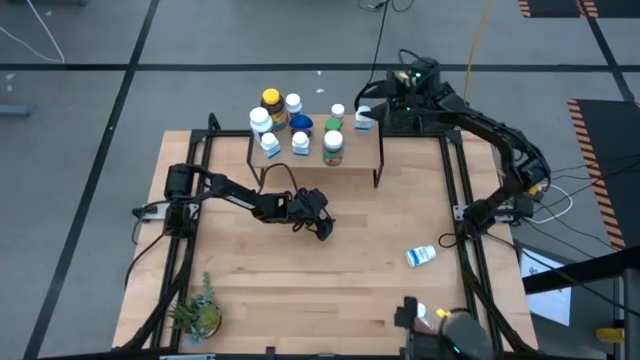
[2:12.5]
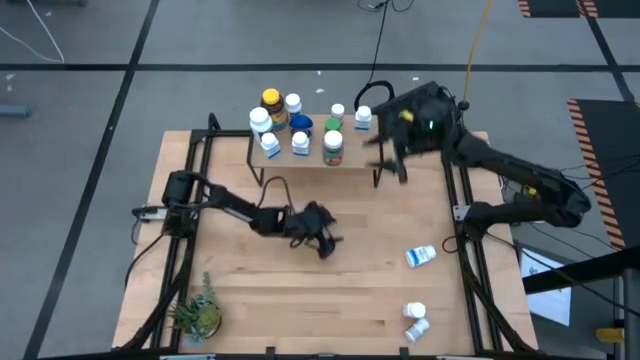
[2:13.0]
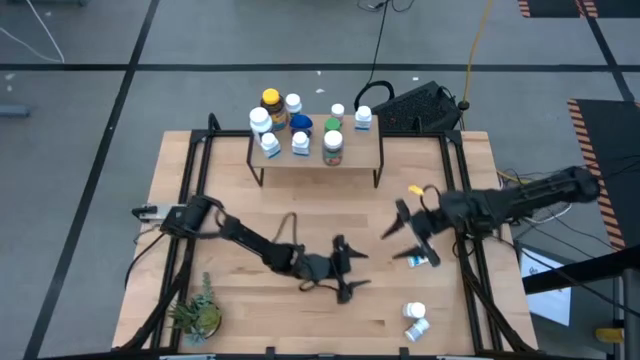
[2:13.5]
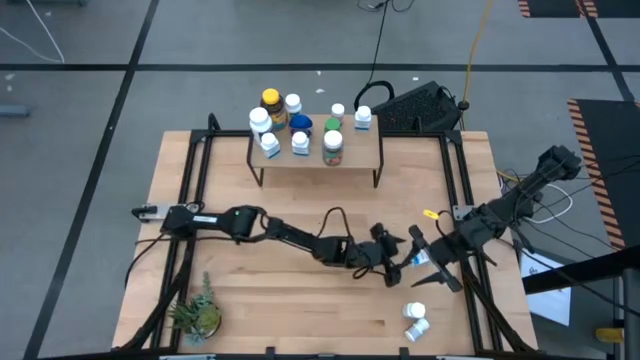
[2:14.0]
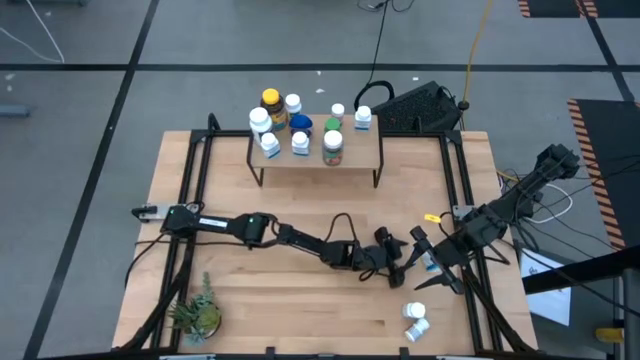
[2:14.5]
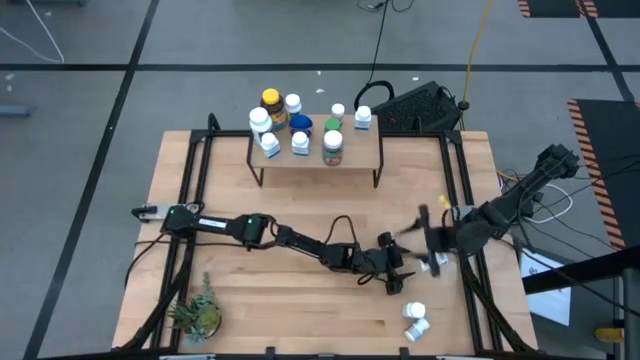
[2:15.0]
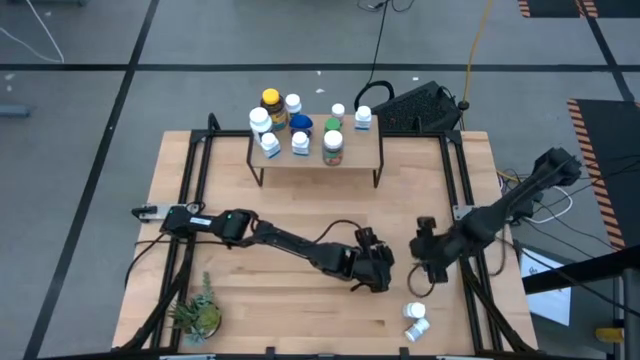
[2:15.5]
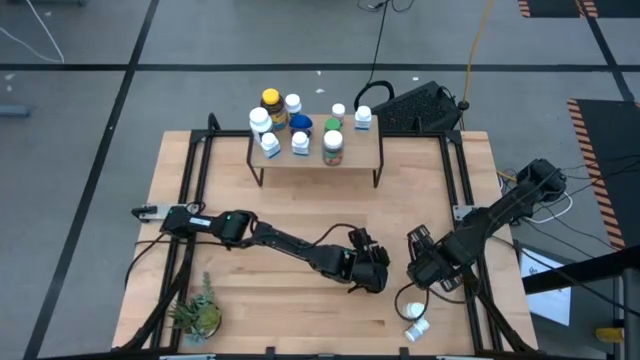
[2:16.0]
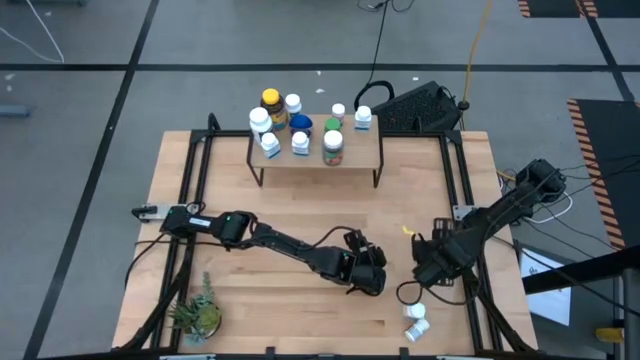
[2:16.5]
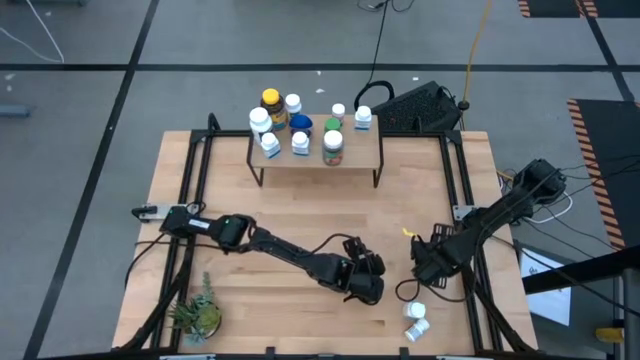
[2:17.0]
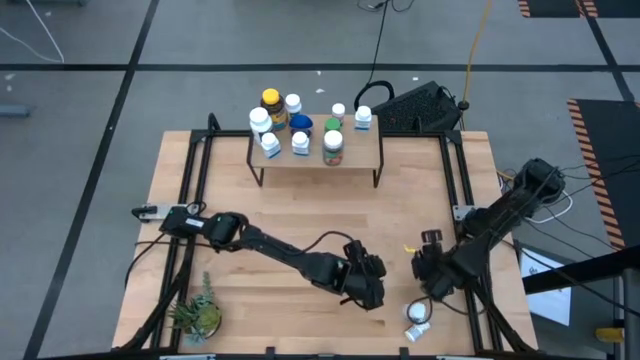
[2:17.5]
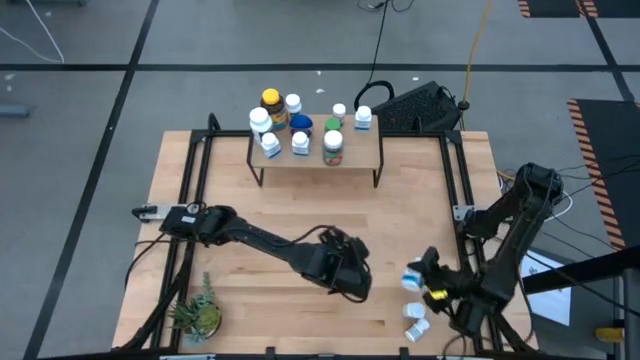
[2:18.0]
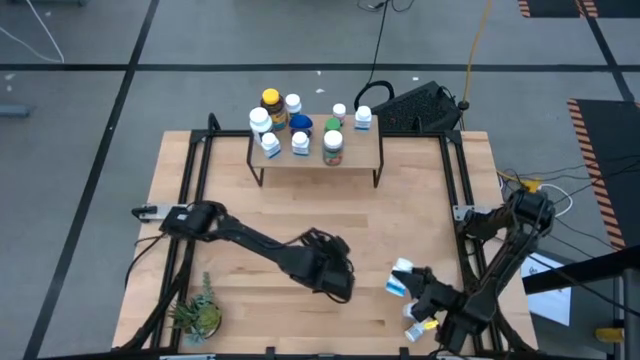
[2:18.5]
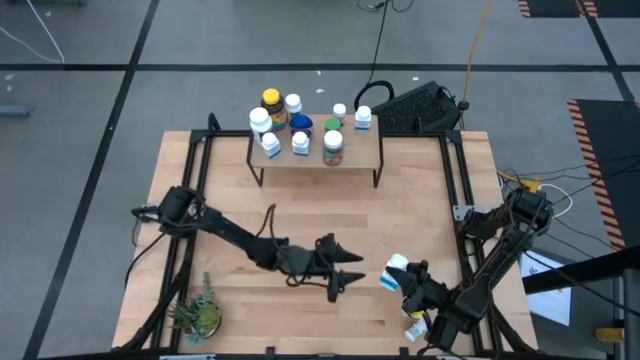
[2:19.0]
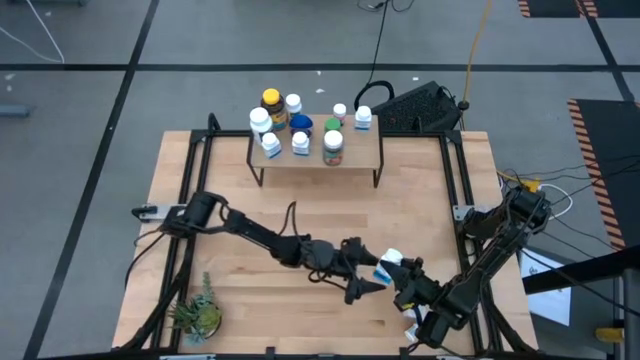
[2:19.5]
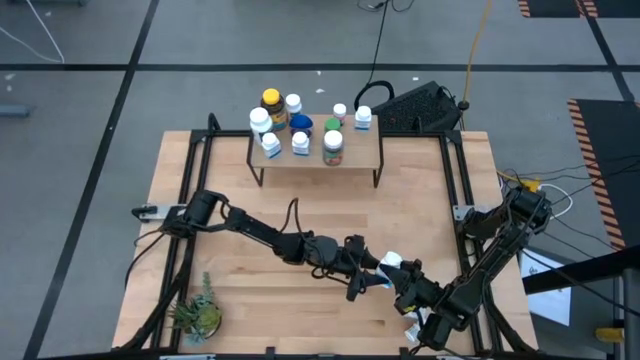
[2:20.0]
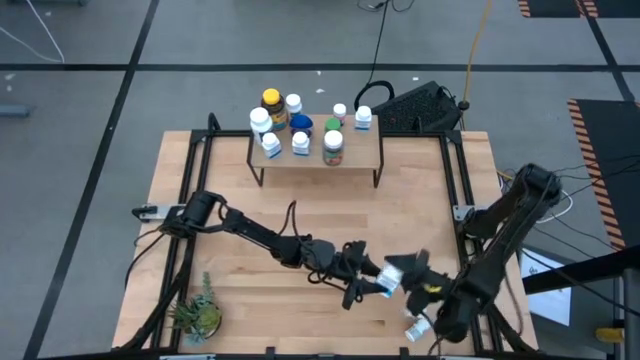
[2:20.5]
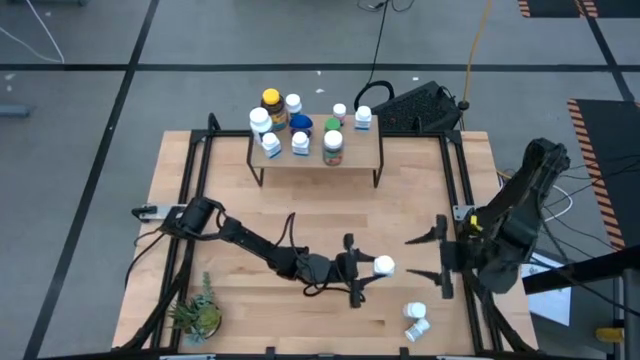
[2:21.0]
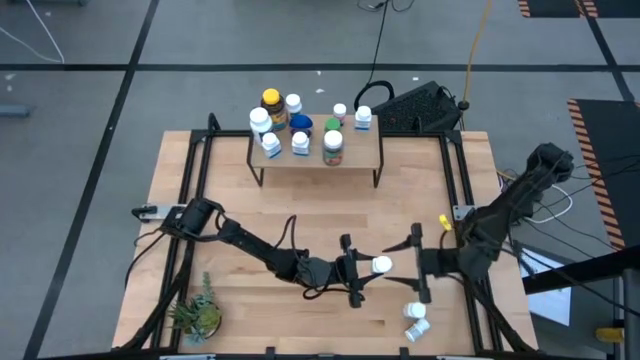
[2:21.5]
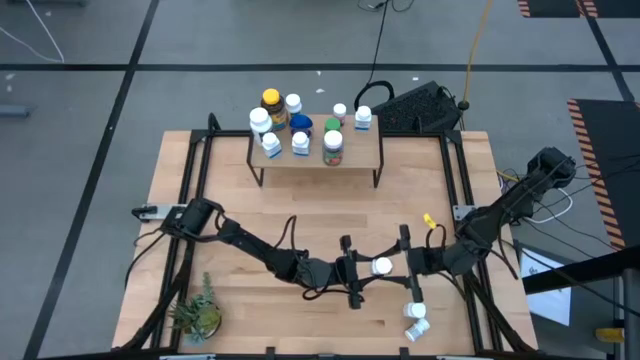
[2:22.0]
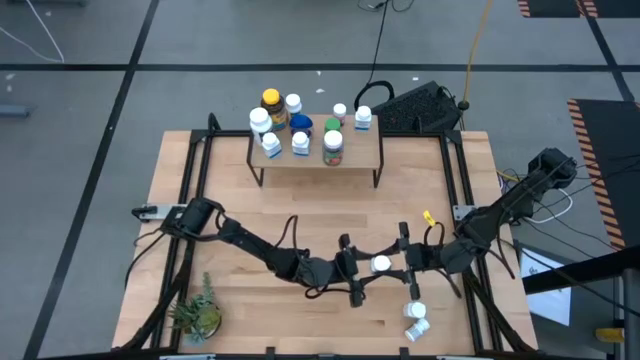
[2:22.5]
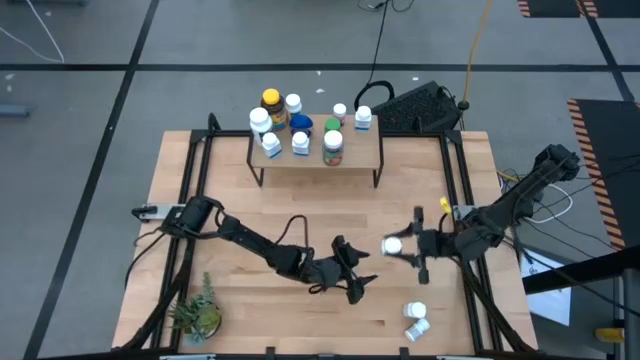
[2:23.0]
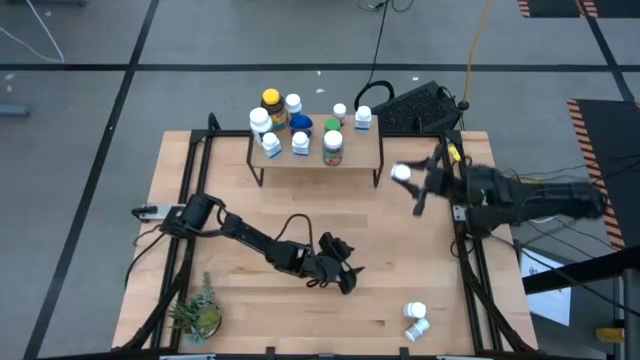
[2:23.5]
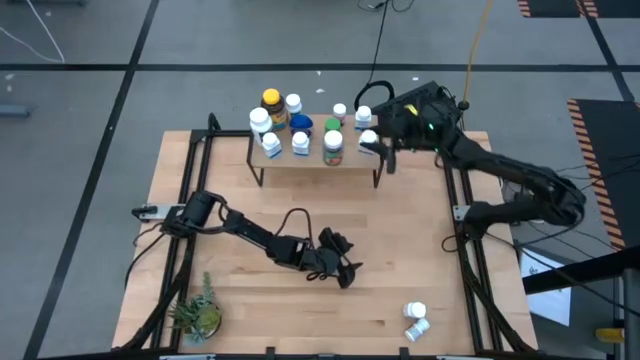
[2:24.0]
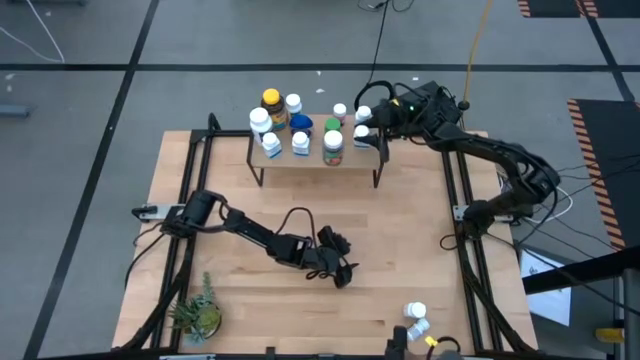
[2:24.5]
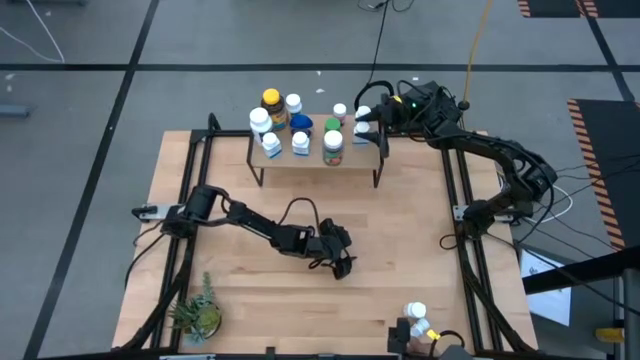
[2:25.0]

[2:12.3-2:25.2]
Task: Pick and place medicine bottles onto shelf by color
Put the white blue medicine bottle on the shelf

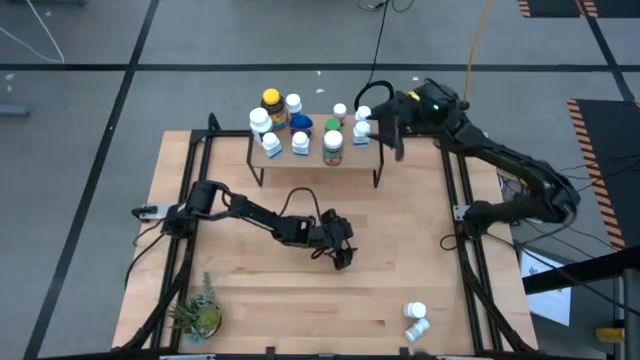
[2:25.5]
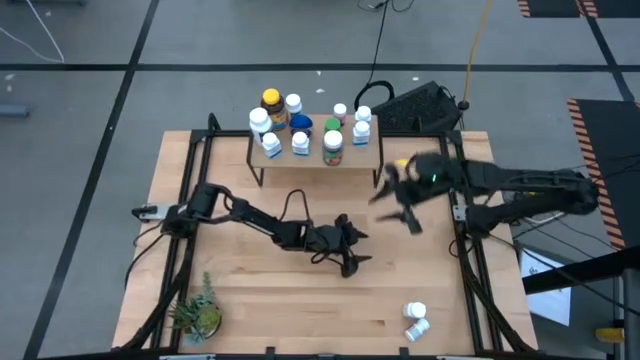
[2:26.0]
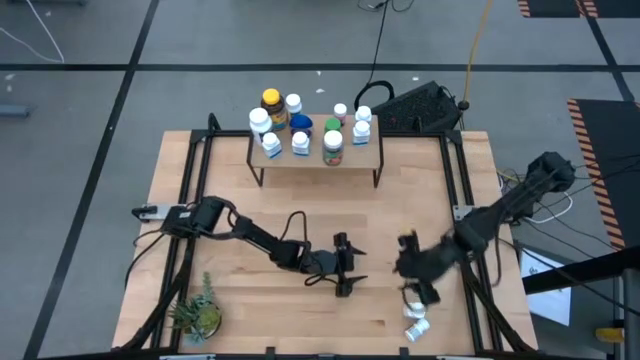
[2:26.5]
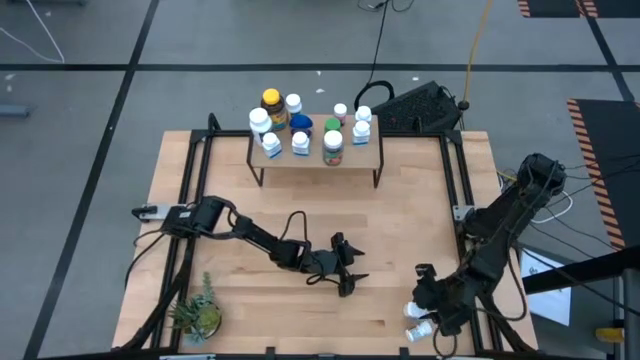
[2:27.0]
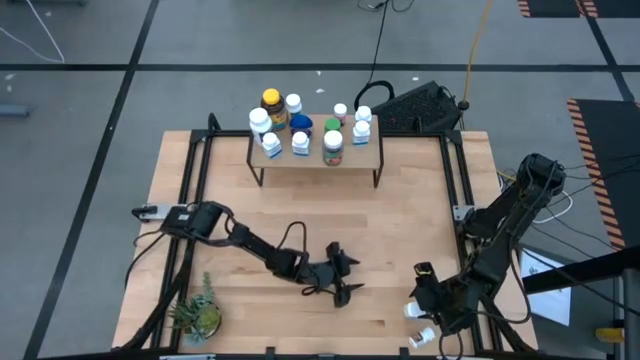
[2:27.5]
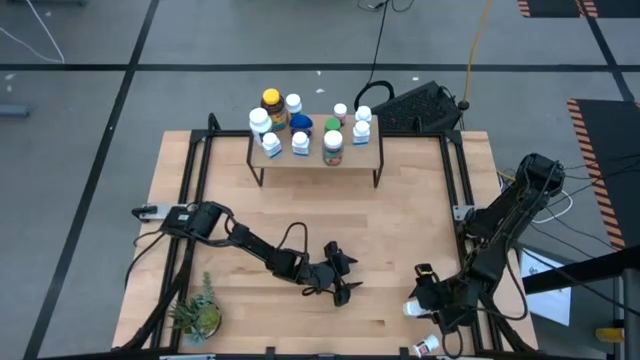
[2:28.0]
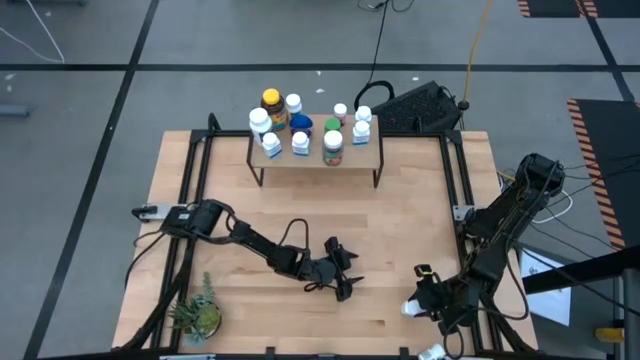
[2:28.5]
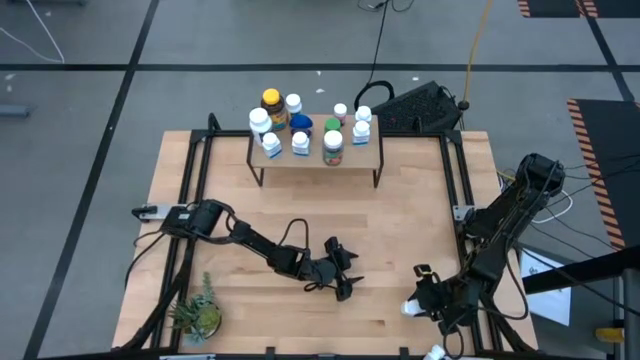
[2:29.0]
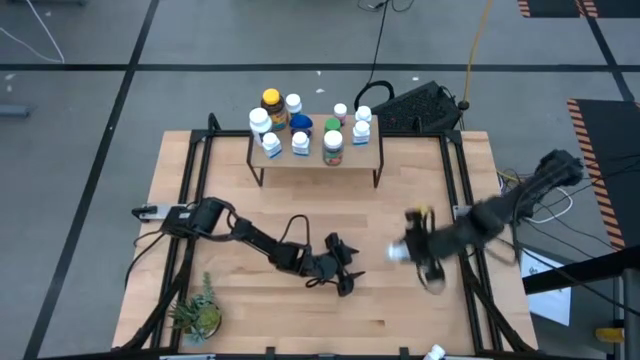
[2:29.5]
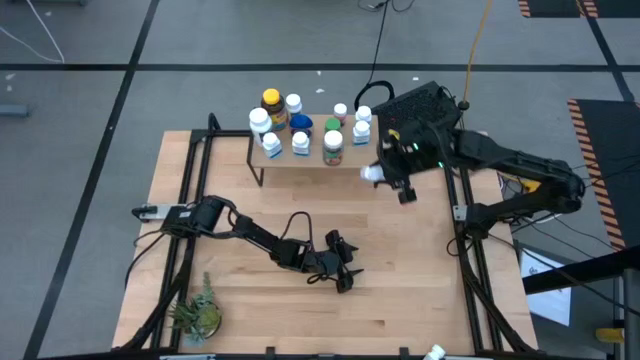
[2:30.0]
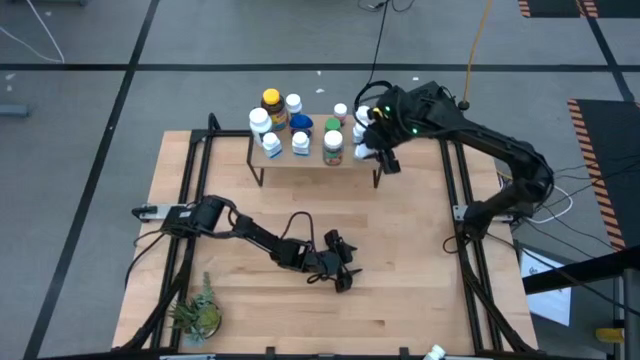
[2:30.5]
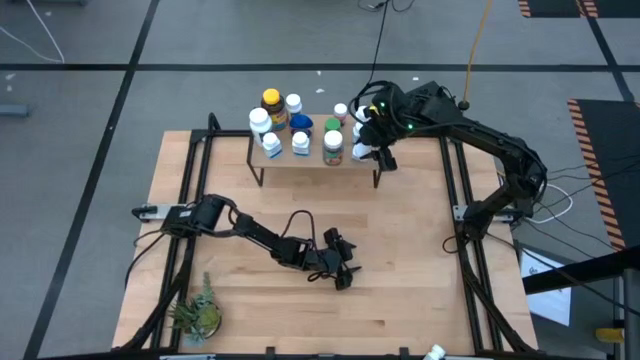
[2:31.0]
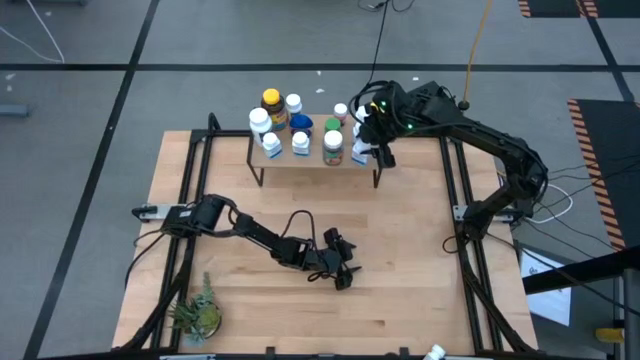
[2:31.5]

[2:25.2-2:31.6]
Put the white blue medicine bottle on the shelf
